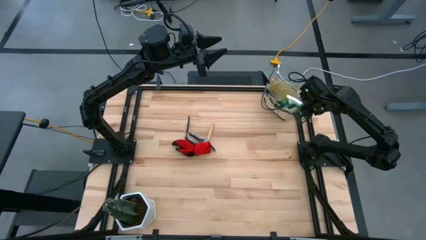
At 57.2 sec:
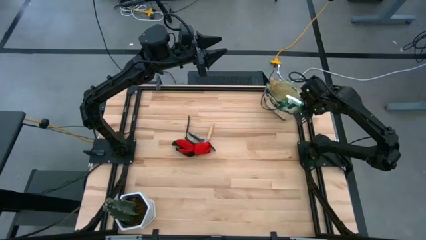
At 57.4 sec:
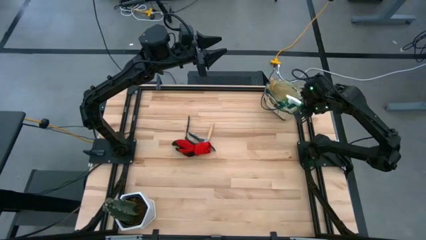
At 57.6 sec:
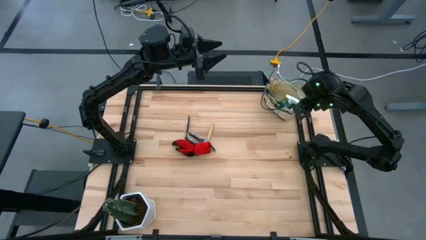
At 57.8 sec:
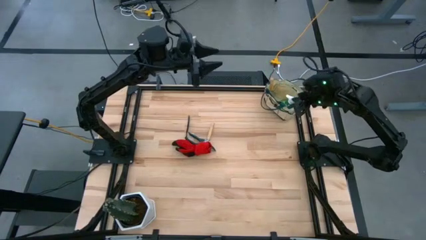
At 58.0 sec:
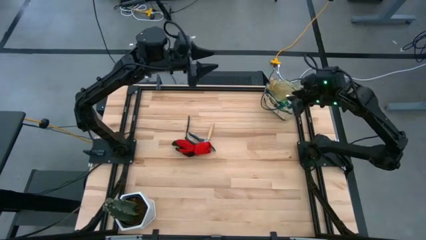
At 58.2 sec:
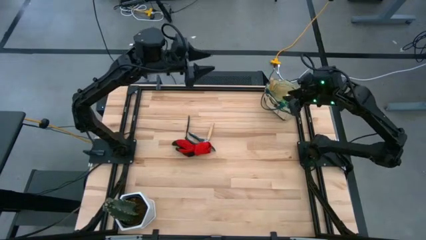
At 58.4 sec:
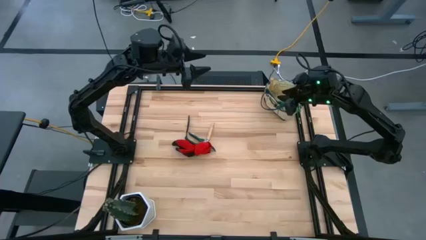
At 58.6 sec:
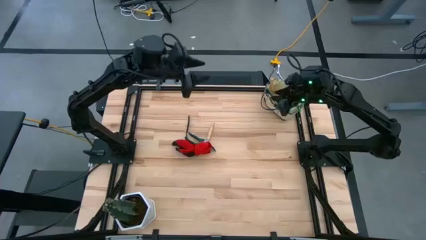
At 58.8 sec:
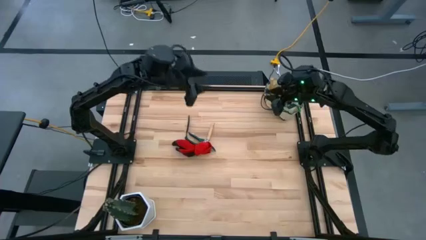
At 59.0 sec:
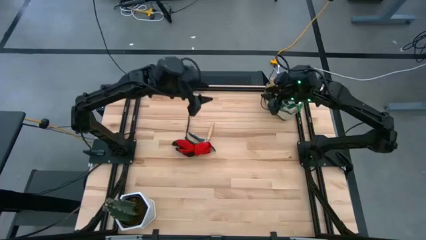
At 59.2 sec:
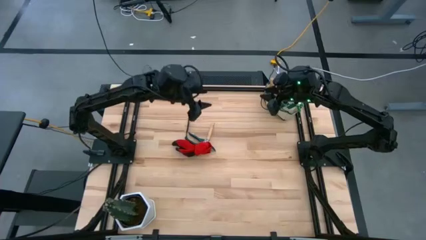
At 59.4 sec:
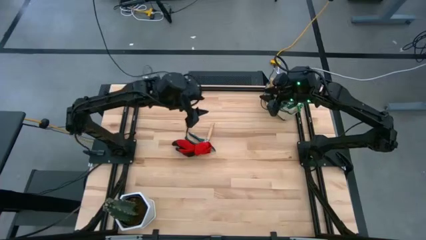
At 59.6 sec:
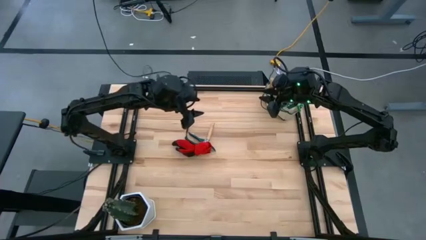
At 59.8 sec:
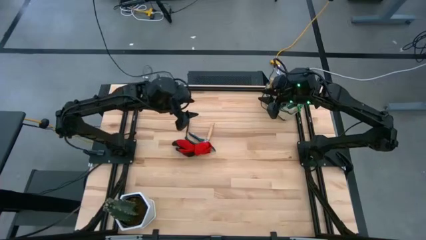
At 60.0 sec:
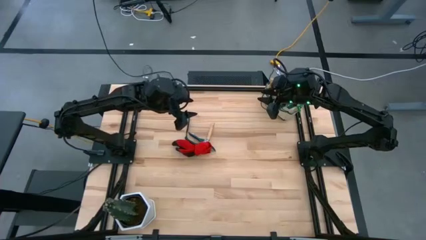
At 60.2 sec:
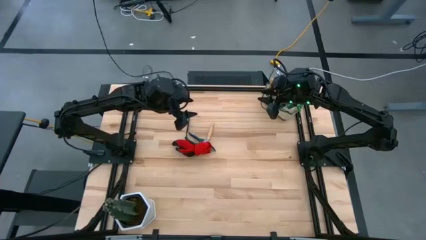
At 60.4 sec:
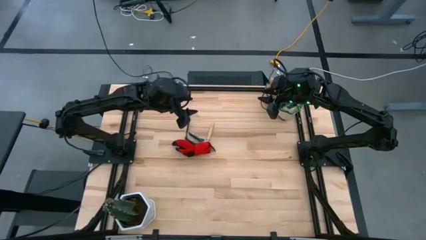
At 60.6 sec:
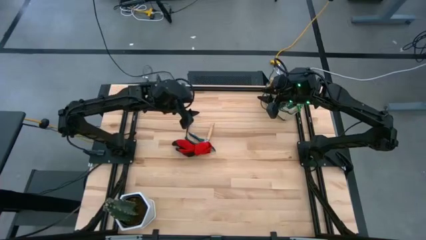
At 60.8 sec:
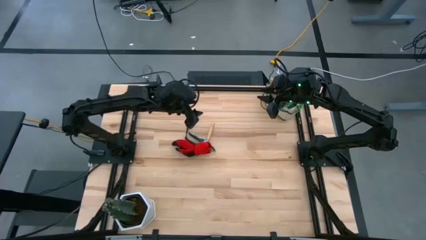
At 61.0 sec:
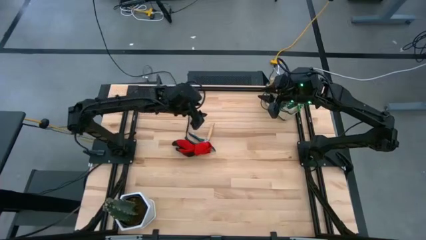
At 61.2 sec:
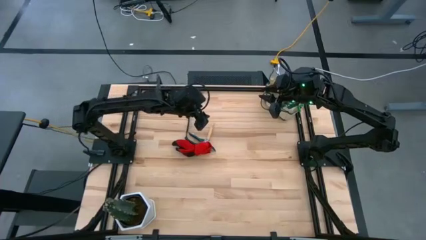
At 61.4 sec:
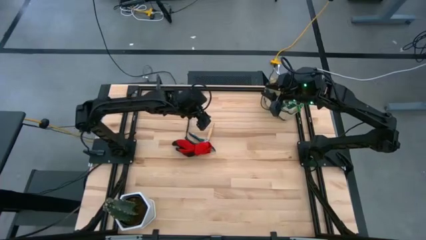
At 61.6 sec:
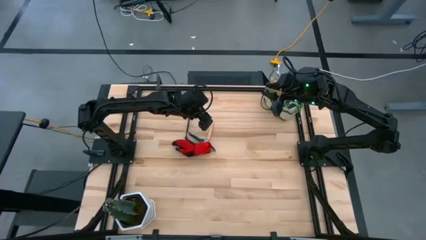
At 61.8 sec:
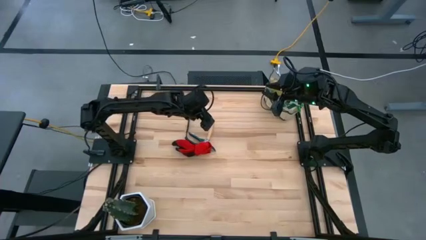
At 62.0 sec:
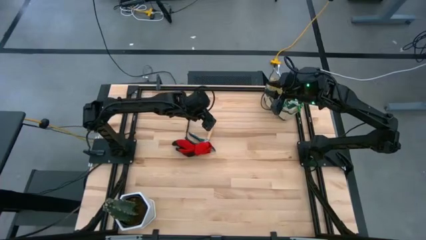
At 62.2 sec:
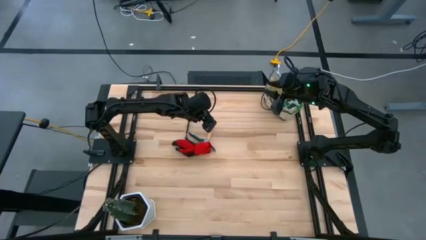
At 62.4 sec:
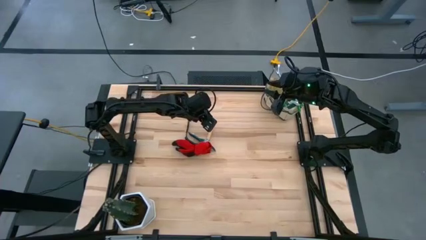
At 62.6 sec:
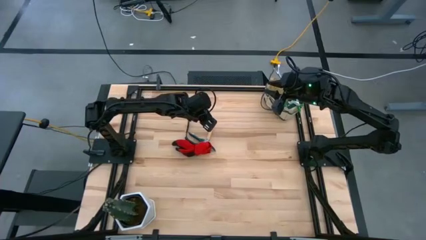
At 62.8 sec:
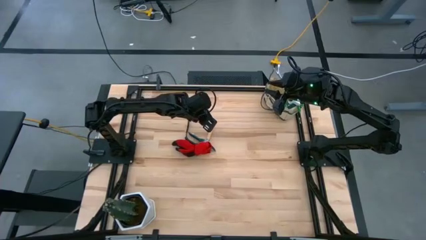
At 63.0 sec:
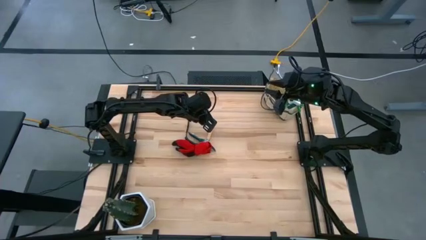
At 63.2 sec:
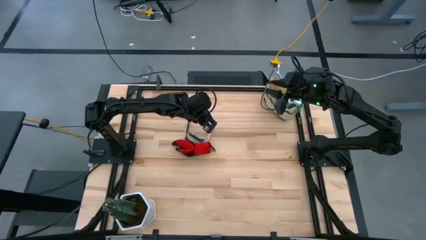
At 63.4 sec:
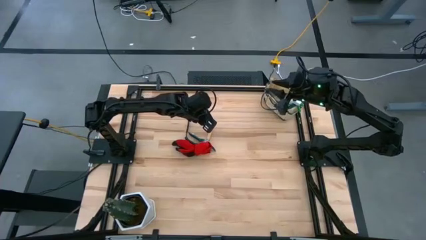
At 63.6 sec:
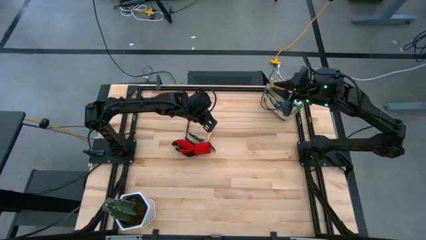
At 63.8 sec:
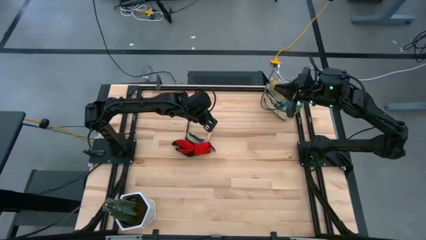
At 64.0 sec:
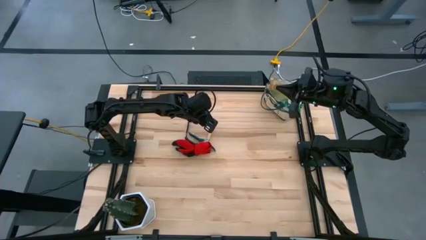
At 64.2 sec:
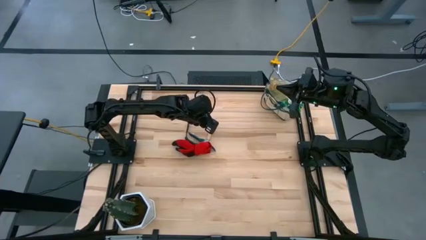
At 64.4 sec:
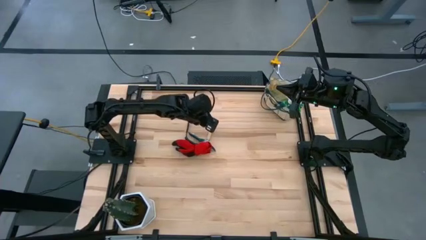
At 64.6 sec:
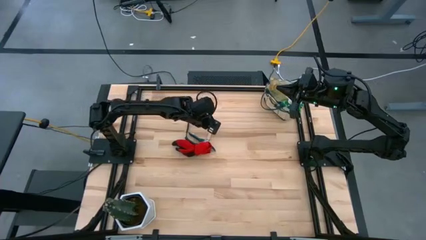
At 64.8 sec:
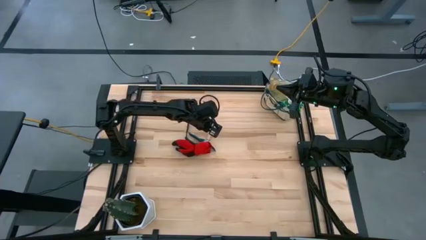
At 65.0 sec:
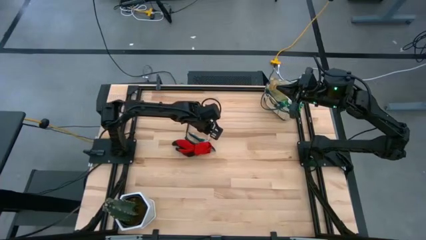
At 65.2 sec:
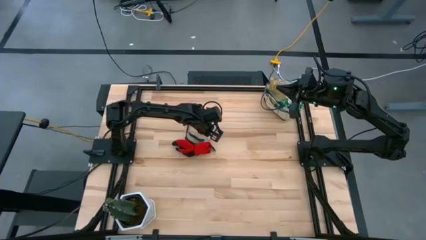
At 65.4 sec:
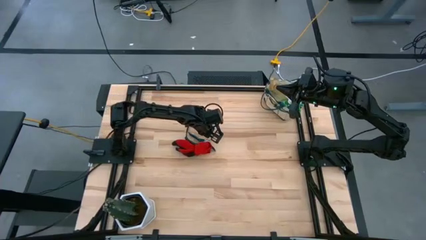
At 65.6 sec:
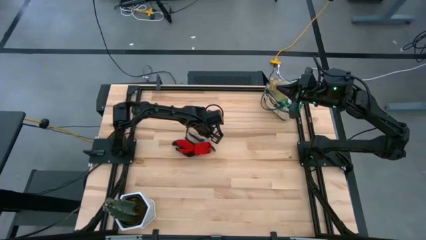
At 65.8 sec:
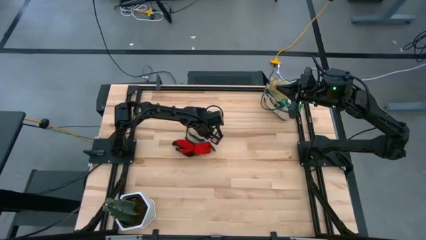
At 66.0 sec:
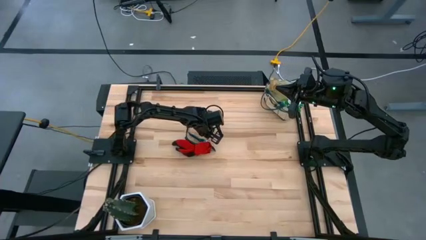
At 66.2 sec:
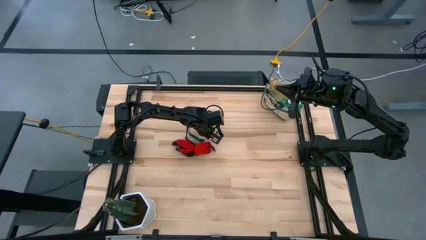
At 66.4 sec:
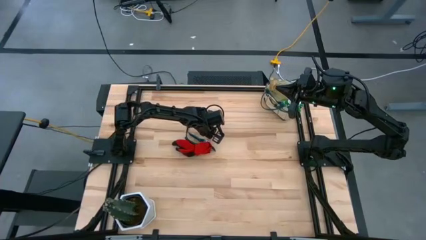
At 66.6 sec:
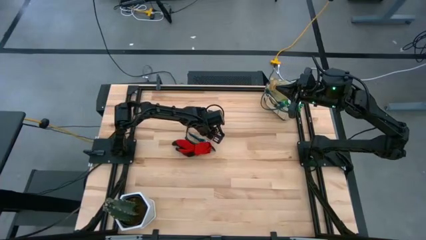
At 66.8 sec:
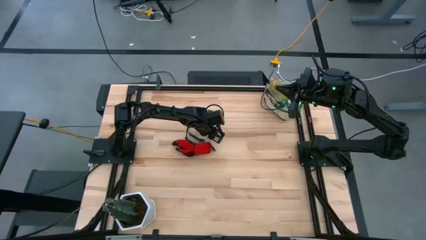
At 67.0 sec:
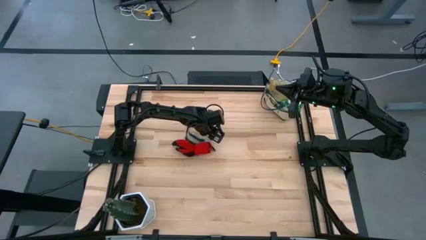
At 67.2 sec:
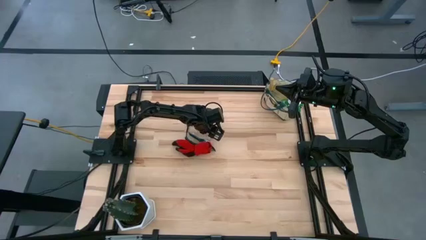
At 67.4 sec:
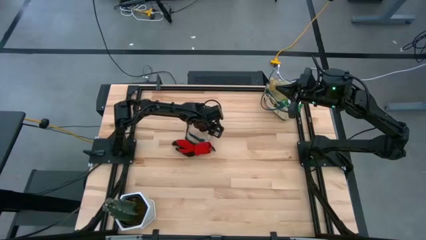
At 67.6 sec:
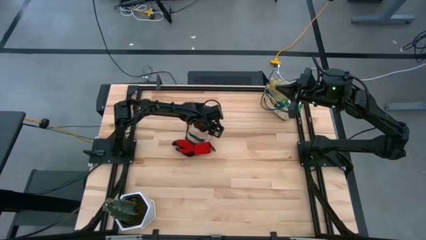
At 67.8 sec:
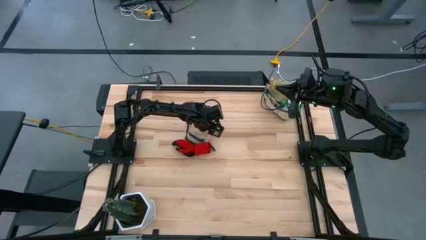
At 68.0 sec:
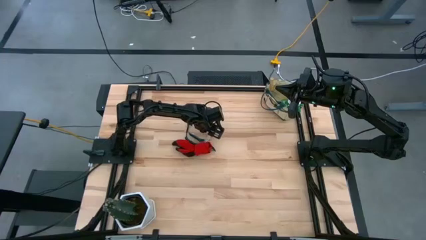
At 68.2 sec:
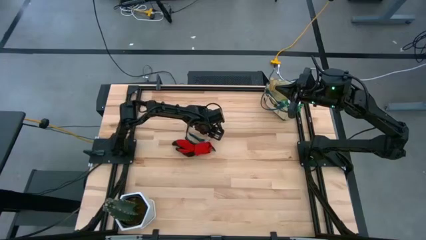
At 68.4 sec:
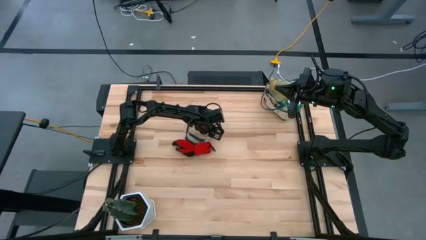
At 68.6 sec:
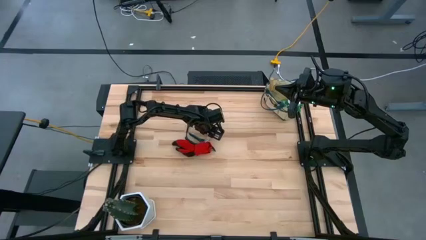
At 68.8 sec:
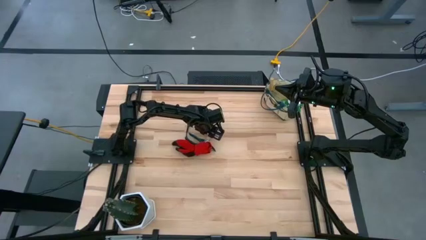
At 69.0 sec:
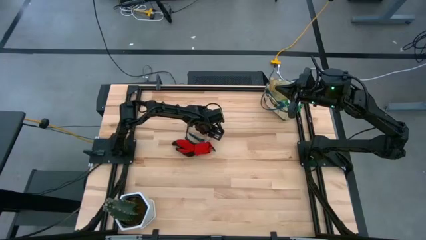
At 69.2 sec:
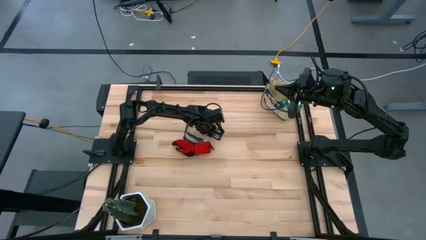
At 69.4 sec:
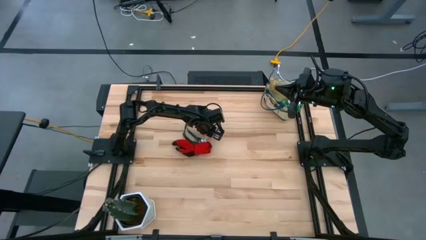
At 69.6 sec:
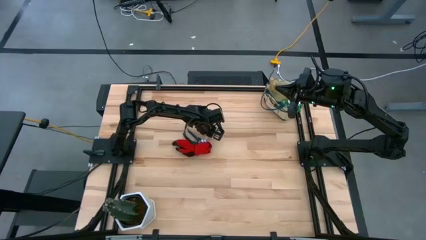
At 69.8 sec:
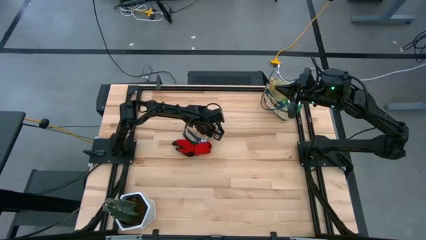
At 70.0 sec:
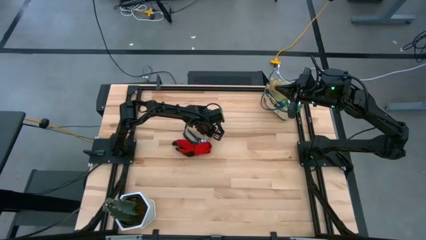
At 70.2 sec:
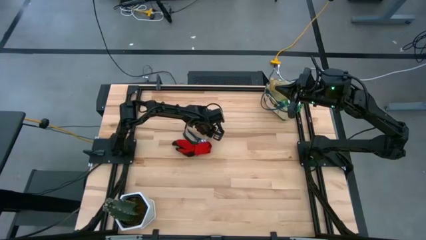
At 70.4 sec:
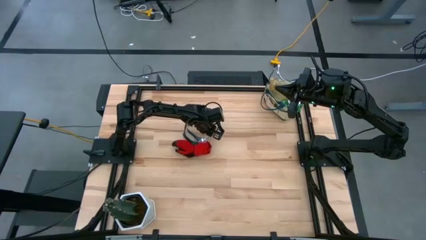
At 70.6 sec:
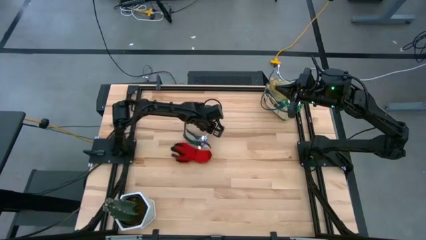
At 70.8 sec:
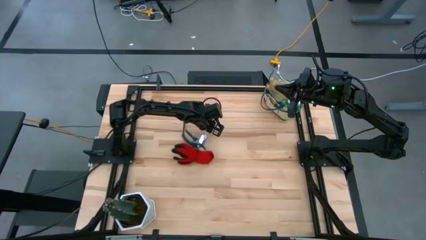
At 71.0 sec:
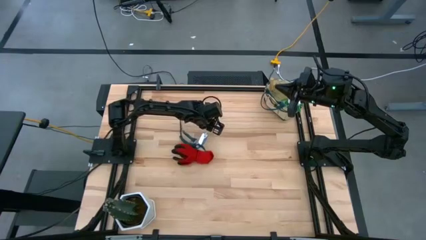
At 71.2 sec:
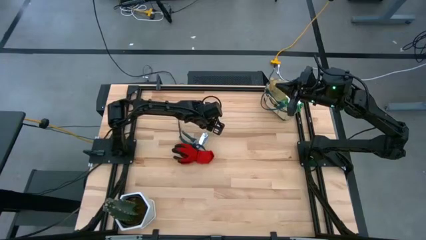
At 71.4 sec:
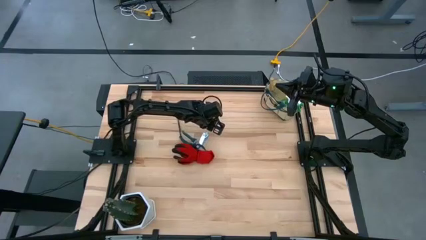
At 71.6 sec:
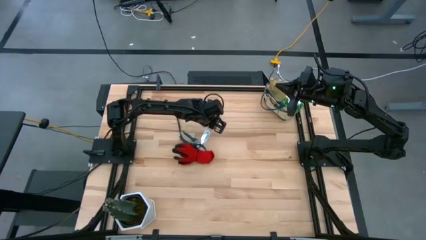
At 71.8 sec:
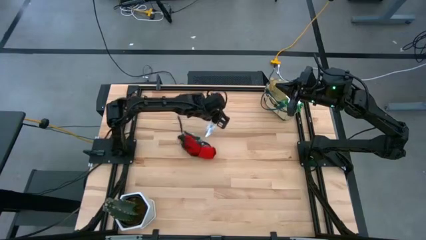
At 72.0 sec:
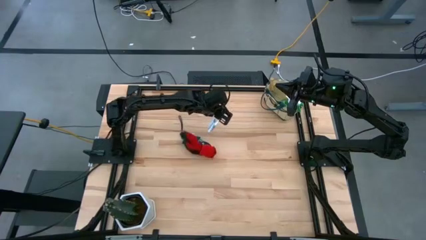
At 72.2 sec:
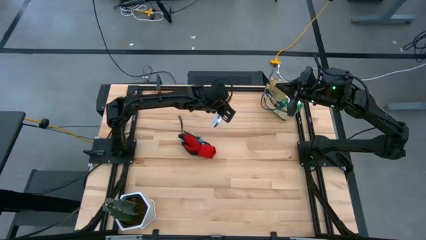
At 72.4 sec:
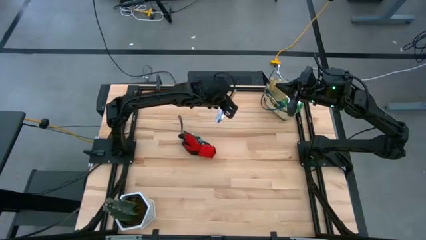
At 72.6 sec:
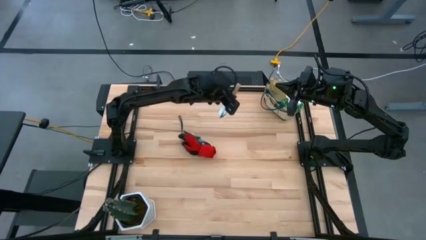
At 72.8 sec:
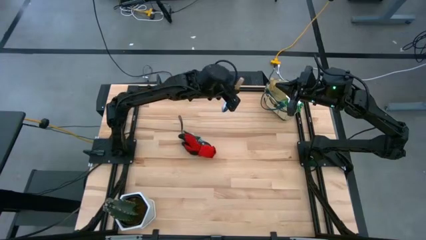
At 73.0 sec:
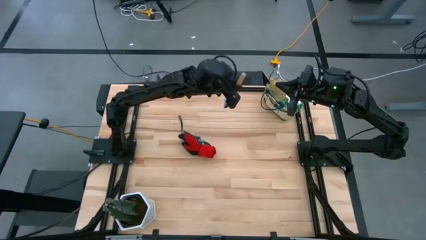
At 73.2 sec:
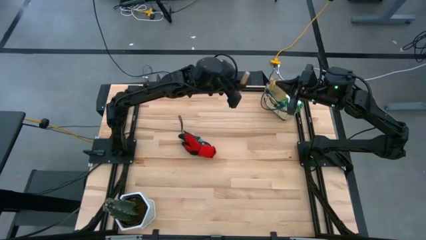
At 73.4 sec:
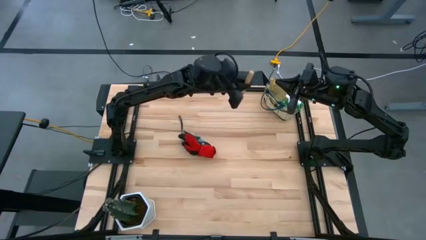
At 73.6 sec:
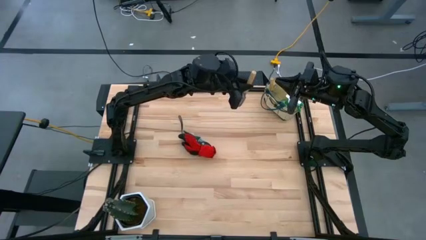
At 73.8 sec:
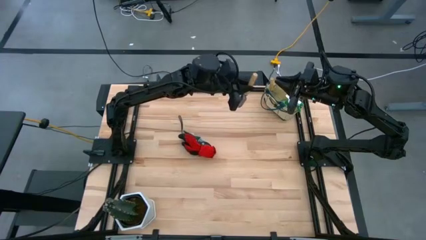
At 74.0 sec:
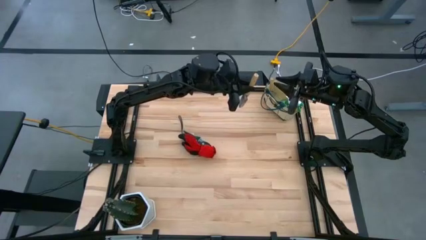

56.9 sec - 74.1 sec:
Task: Pick & Place Garden tools in Gardening bag
Put the brown trowel into the gardening bag
